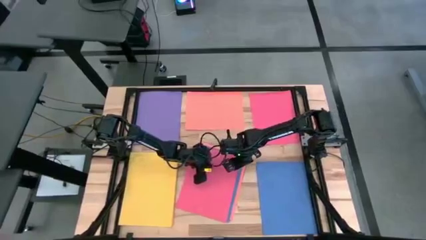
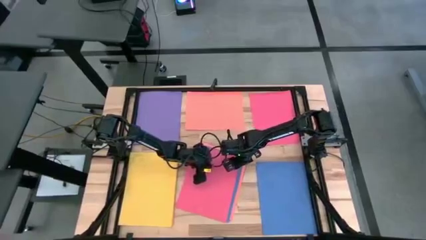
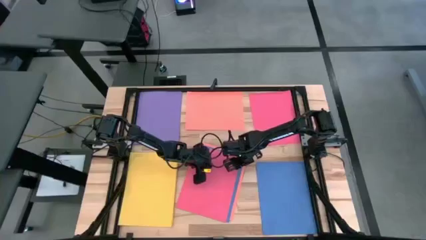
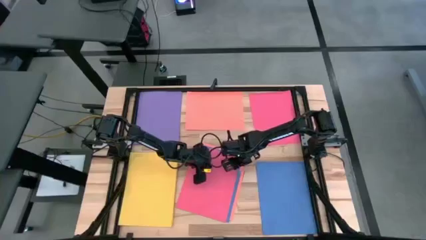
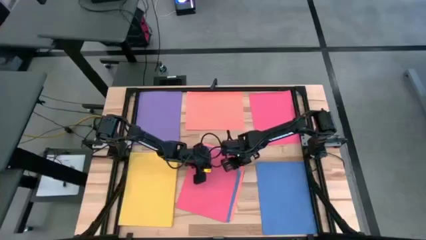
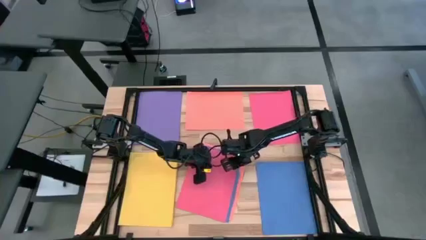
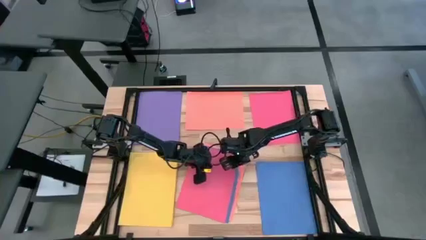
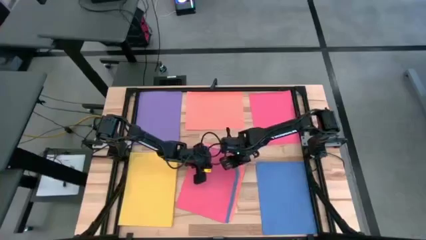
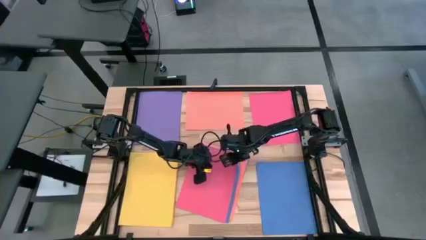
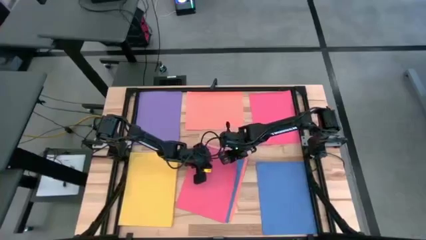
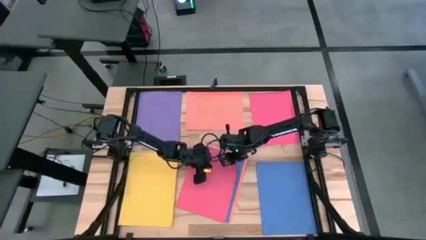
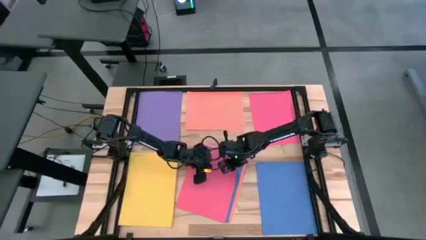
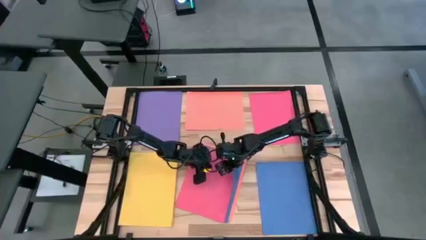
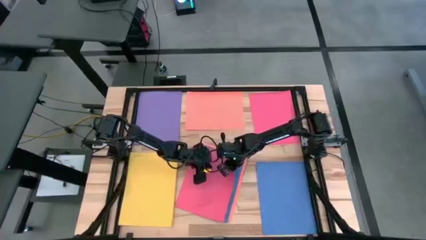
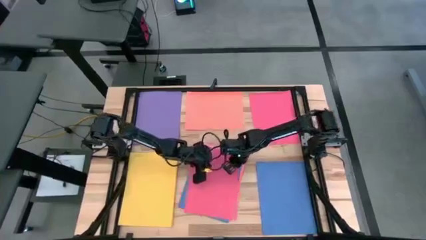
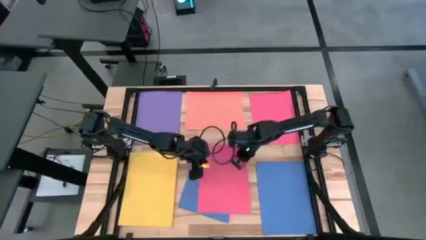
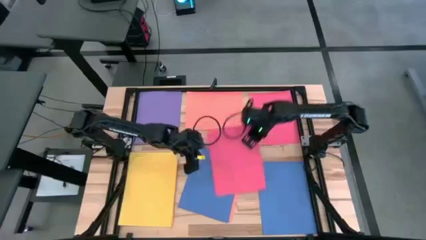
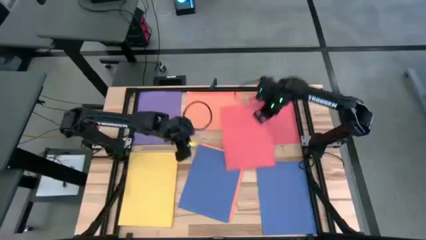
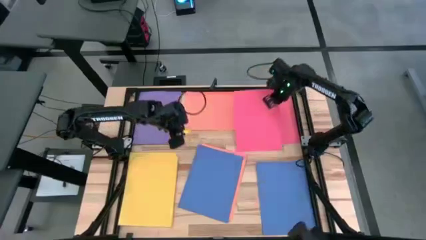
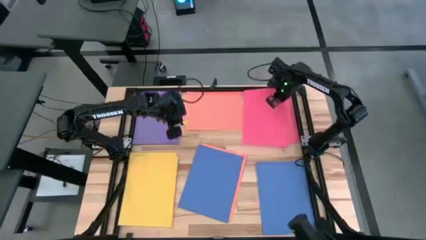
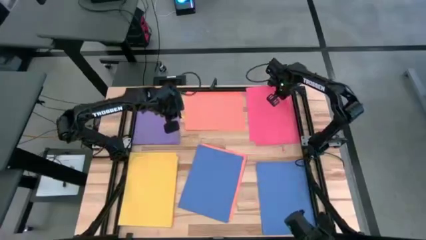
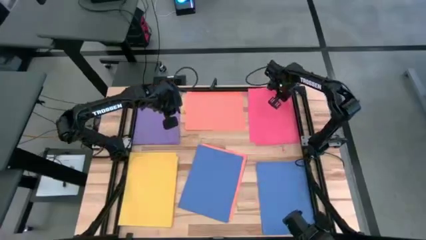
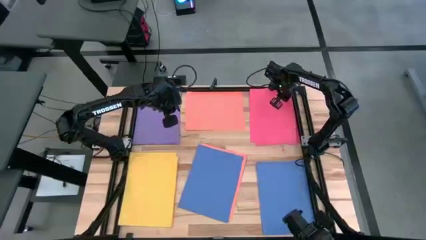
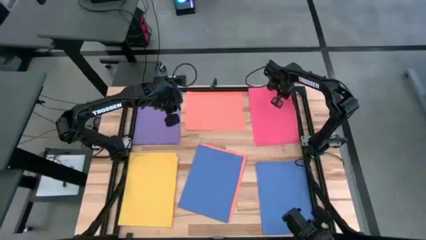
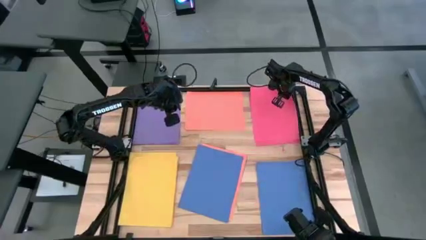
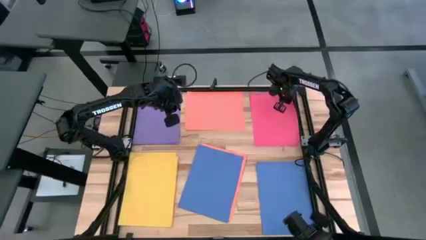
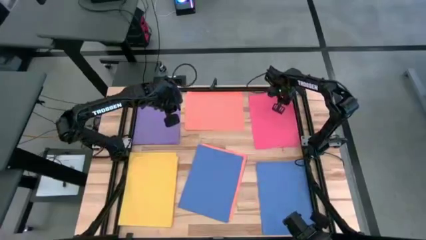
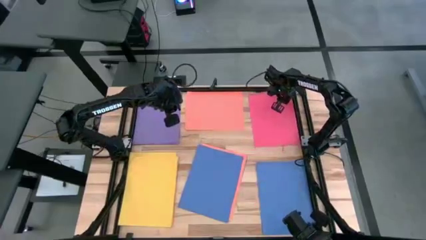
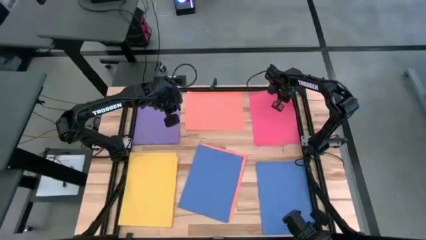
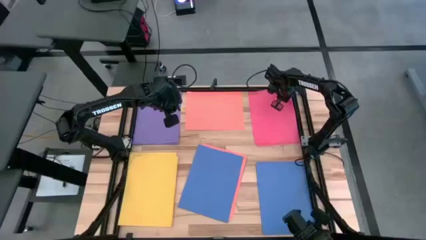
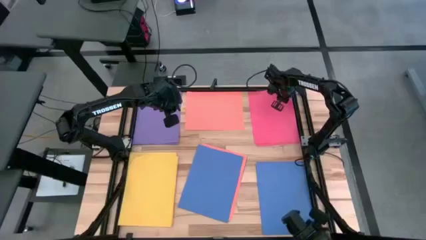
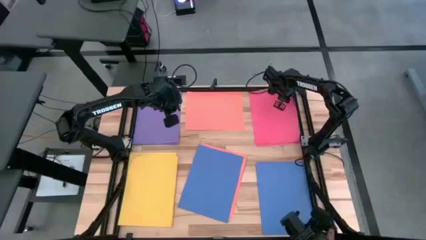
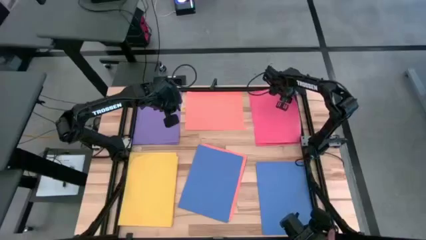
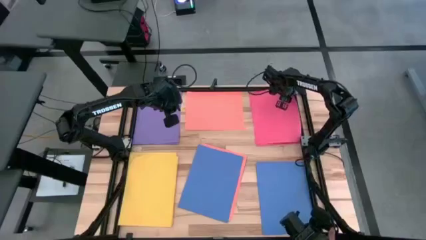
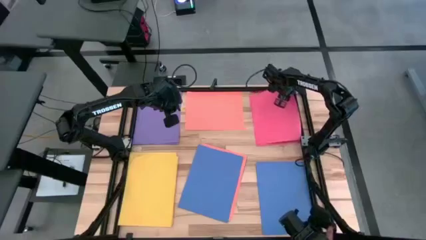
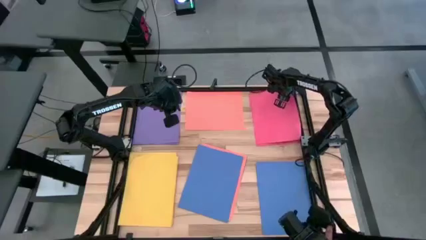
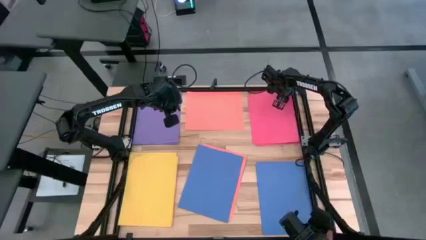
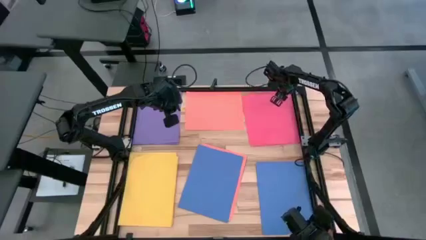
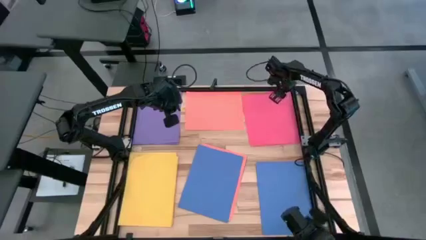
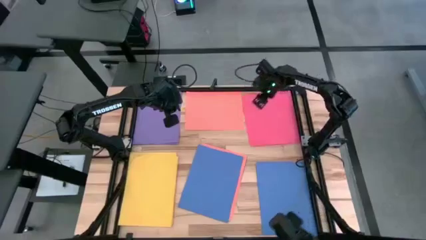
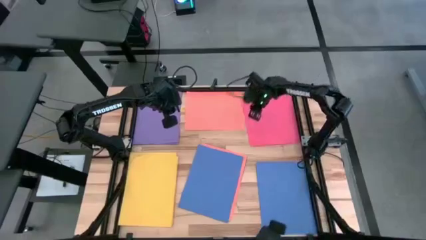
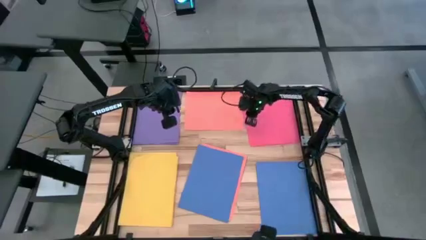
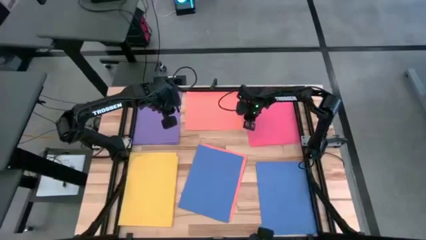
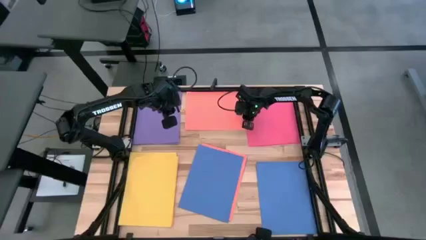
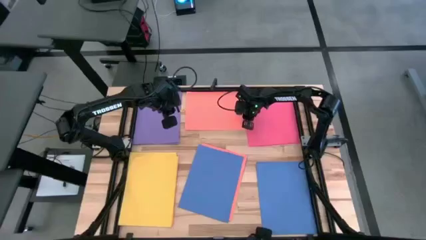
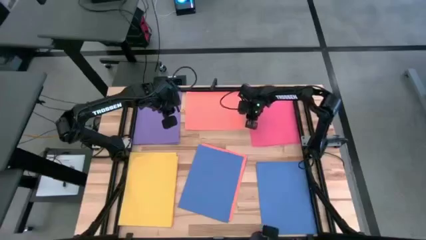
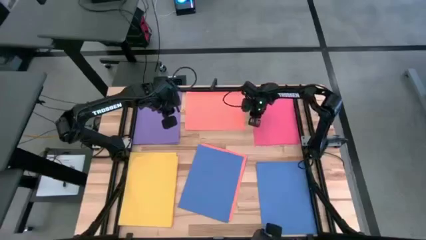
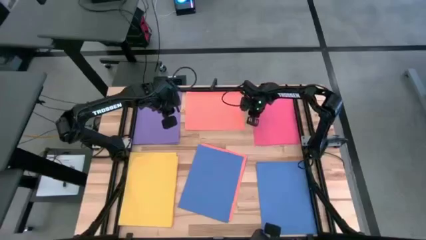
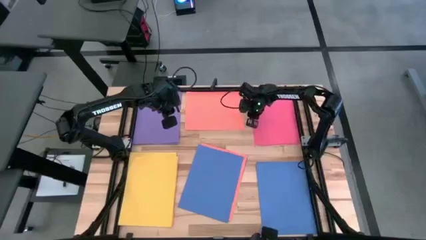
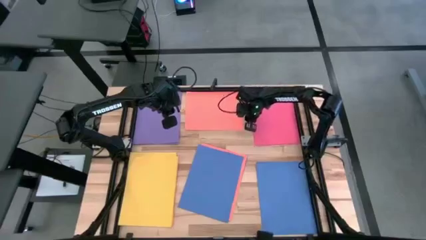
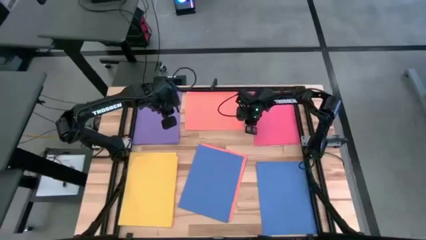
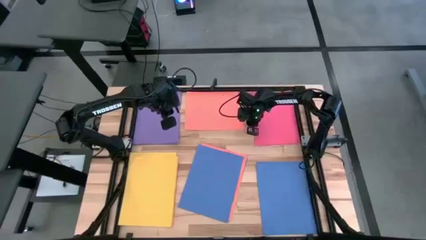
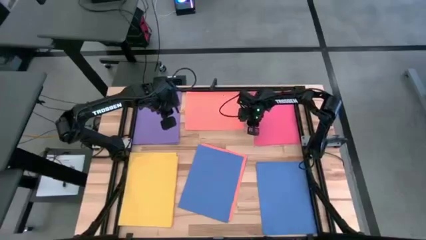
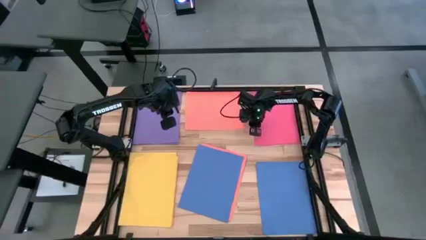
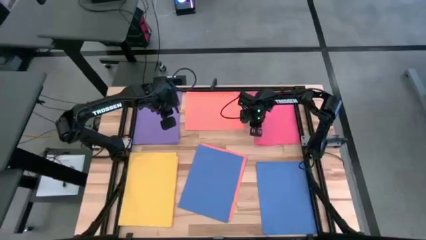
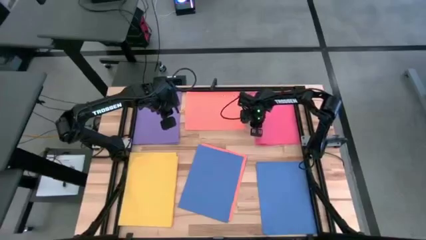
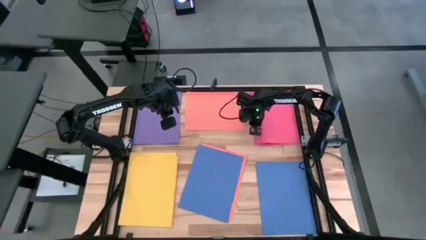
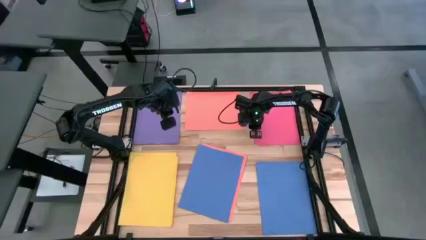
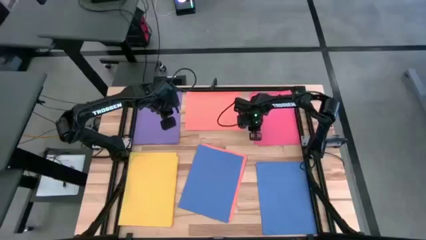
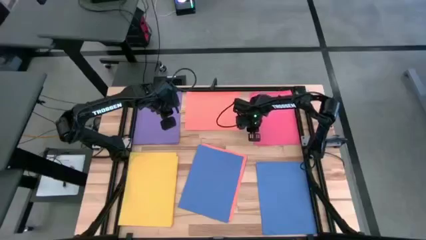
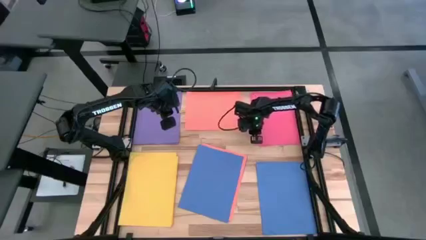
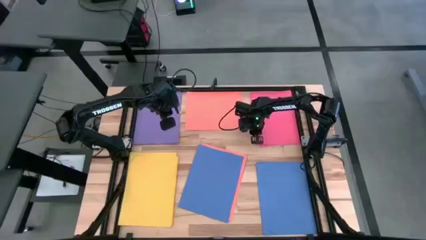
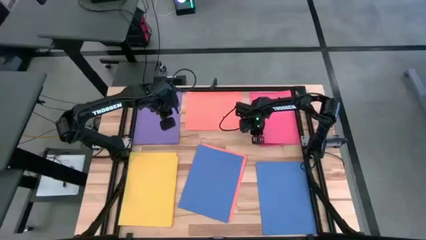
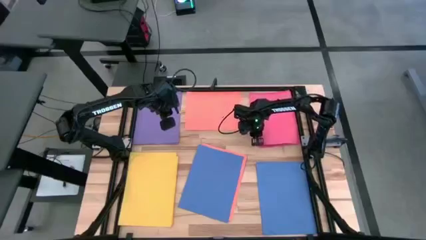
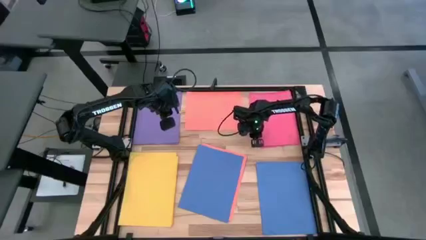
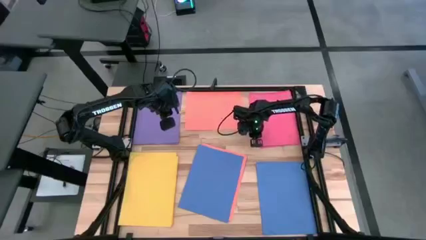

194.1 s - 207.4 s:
Task: Organize paper
Stack the pink paper on top of the other pink paper

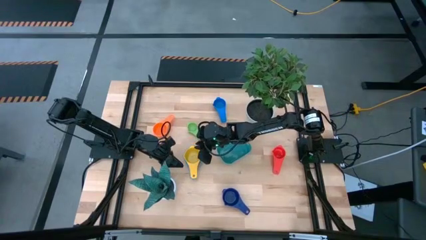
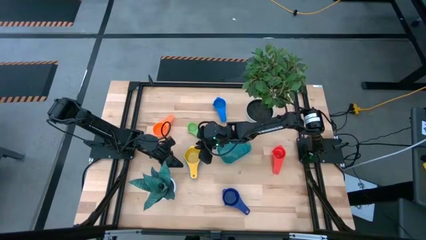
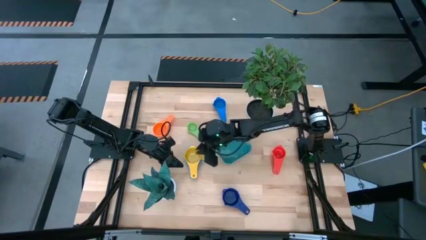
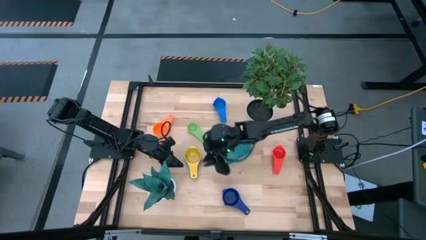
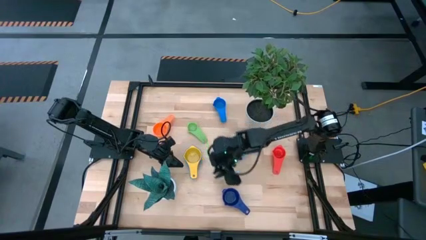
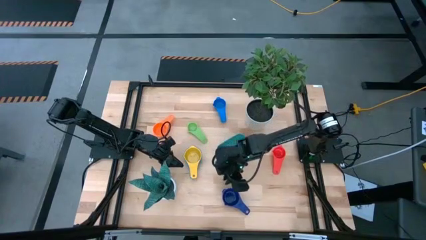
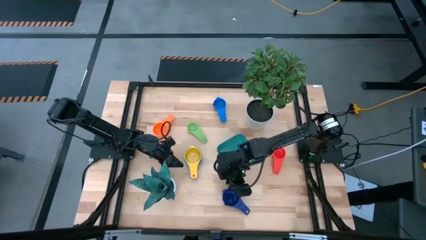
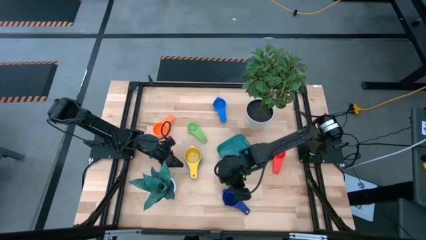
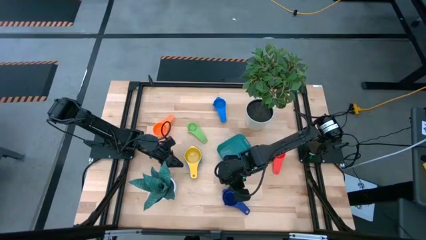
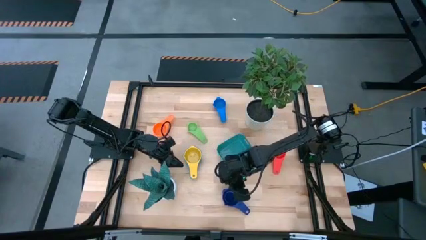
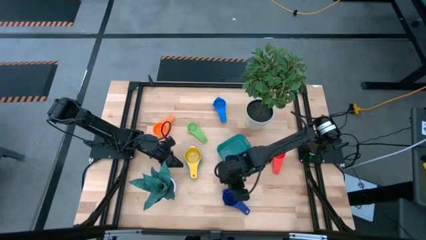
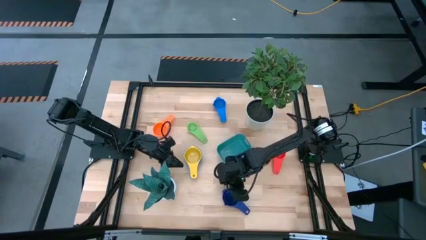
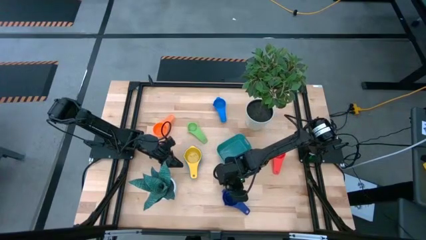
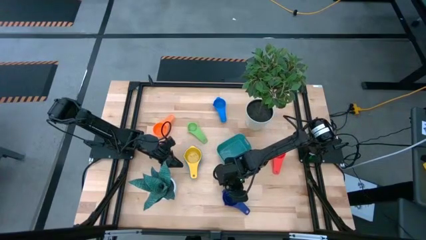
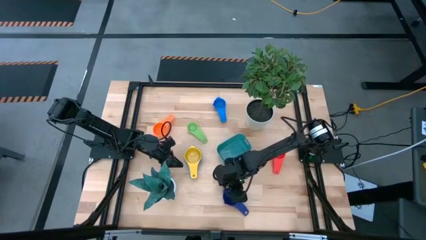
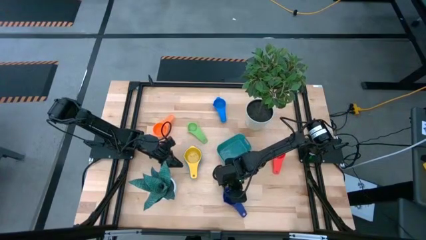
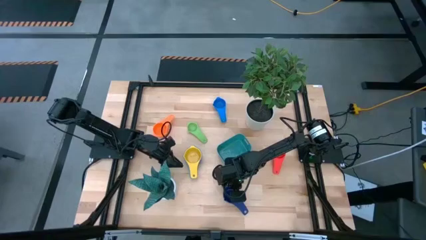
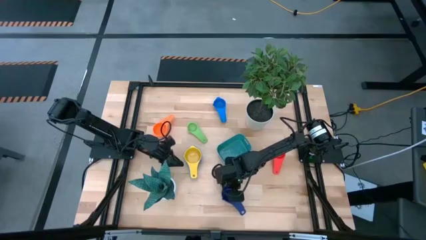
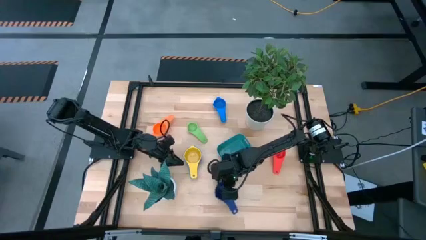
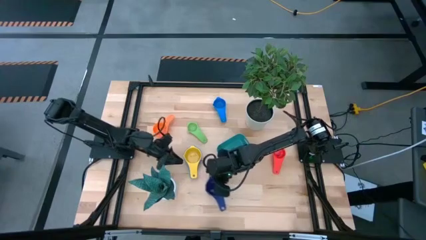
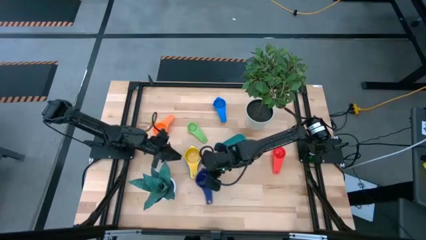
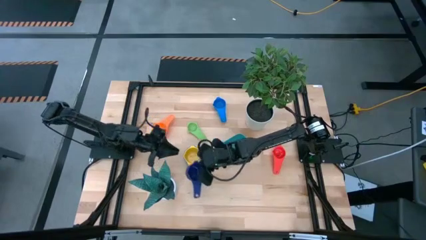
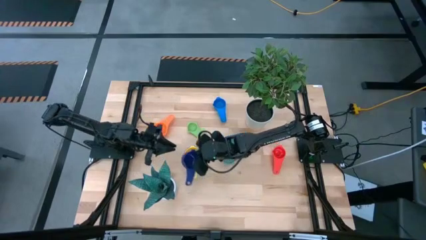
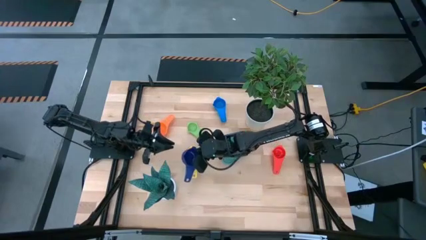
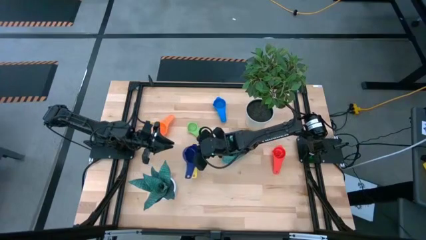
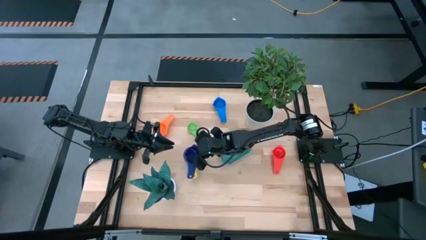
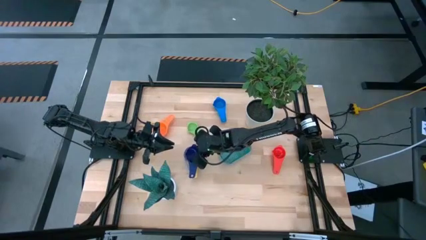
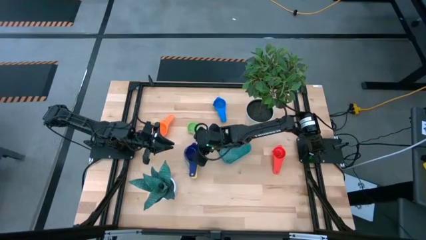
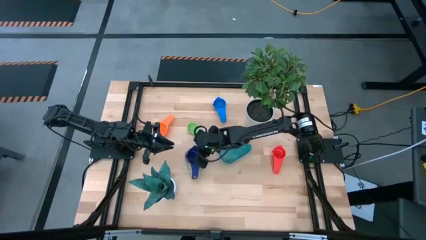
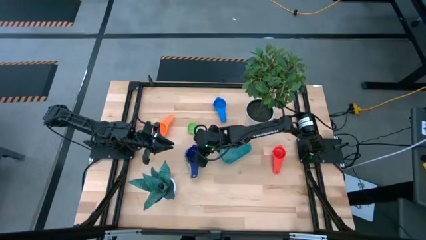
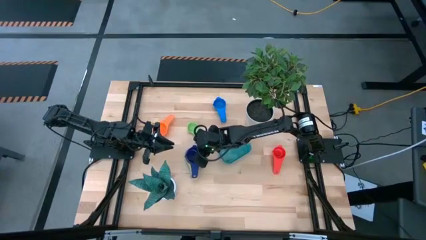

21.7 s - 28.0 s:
Task: Nest measuring cups in basket
Stack the dark blue measuring cup on top of the yellow measuring cup
